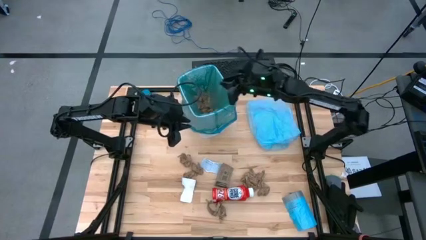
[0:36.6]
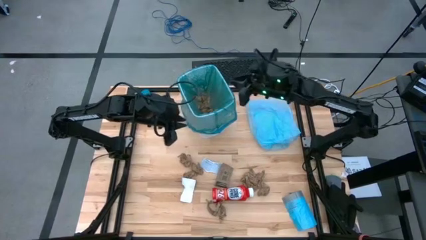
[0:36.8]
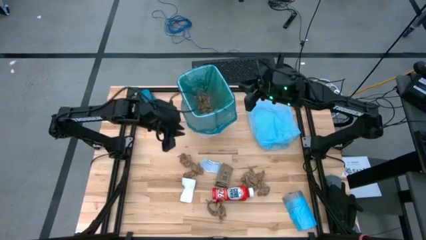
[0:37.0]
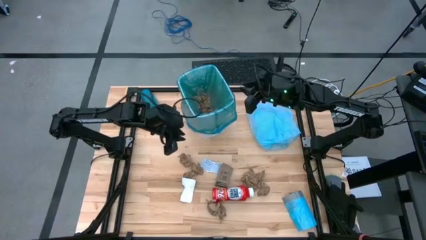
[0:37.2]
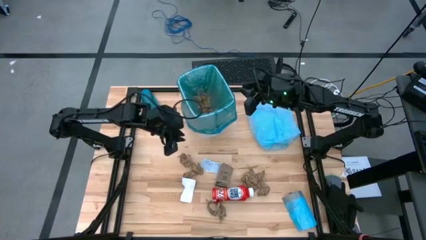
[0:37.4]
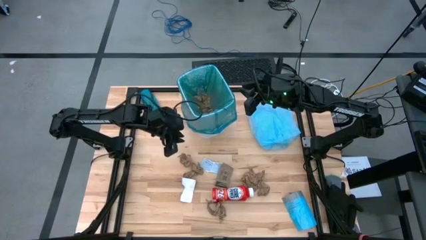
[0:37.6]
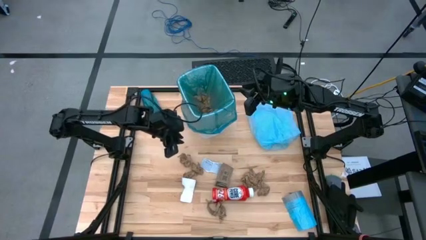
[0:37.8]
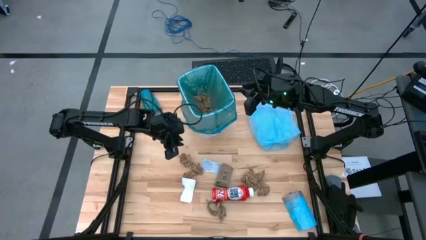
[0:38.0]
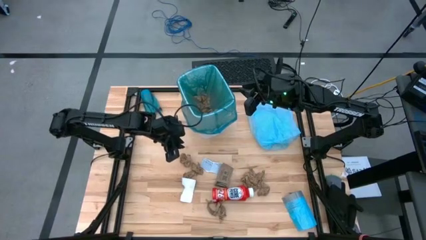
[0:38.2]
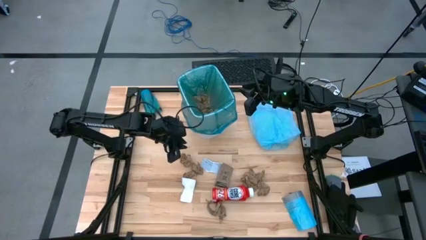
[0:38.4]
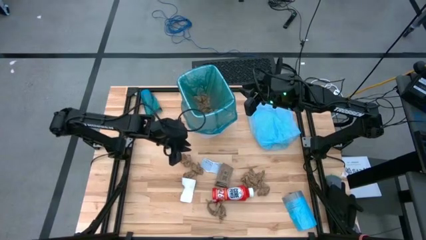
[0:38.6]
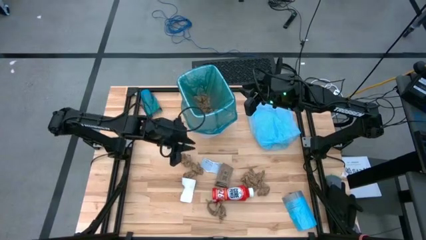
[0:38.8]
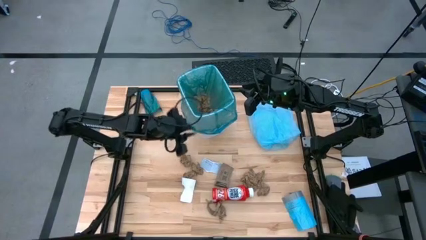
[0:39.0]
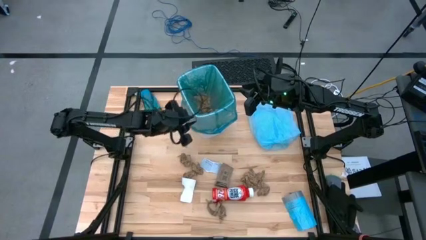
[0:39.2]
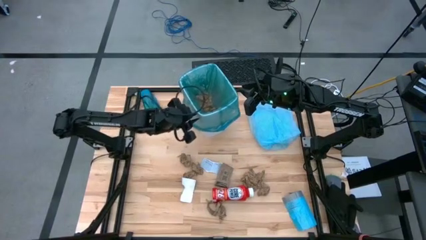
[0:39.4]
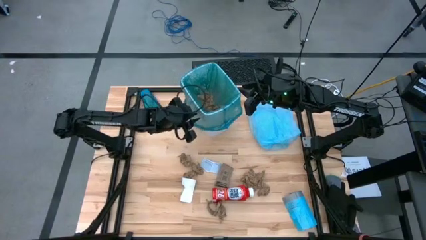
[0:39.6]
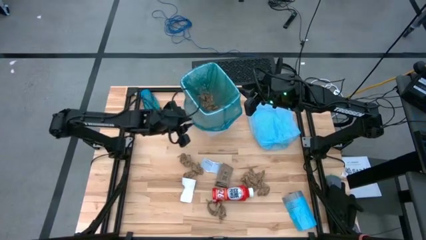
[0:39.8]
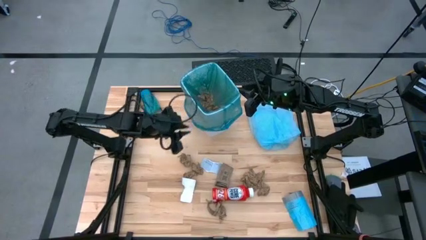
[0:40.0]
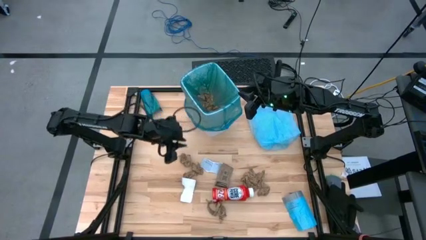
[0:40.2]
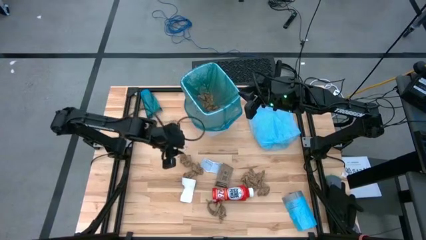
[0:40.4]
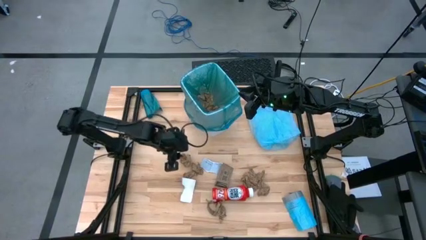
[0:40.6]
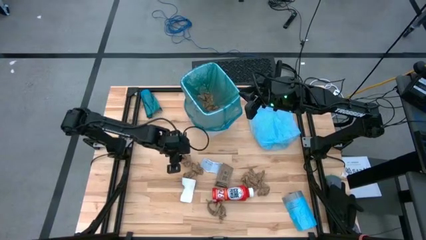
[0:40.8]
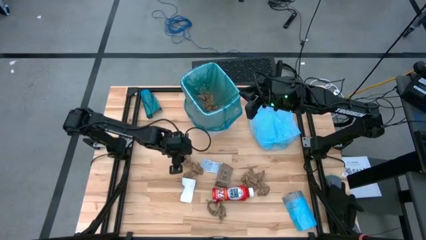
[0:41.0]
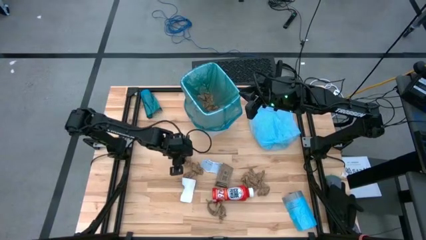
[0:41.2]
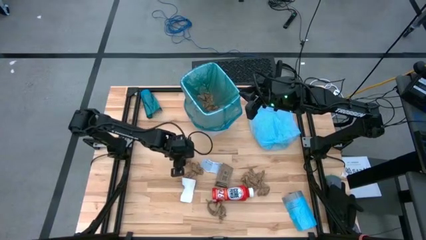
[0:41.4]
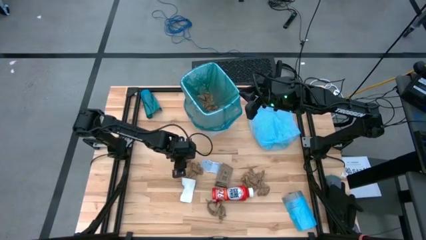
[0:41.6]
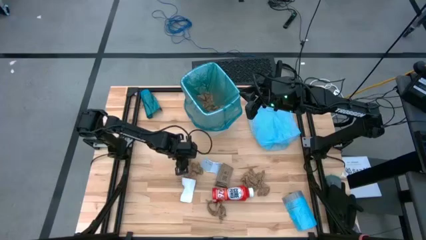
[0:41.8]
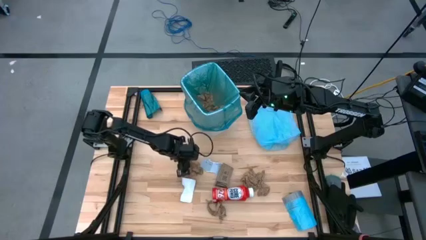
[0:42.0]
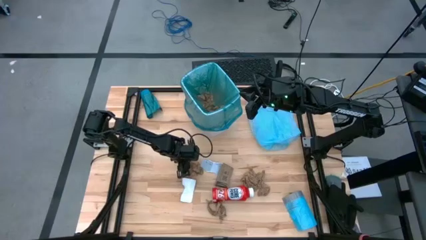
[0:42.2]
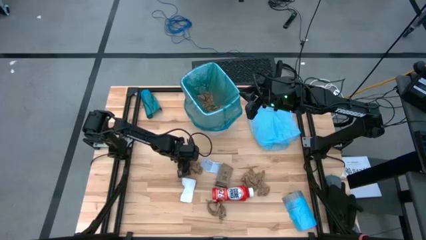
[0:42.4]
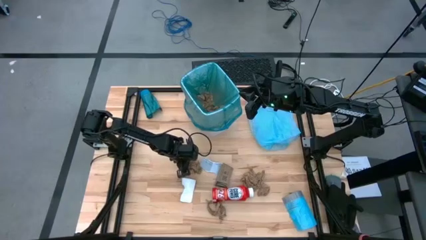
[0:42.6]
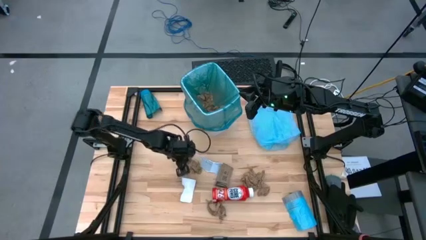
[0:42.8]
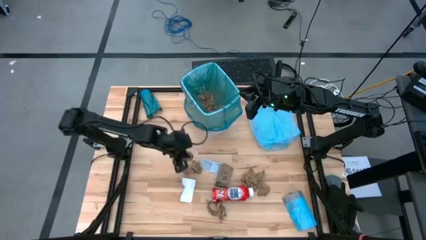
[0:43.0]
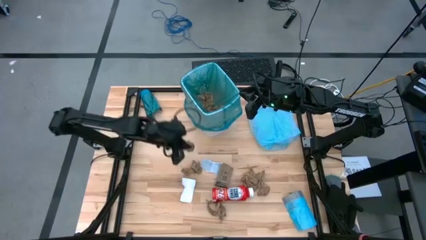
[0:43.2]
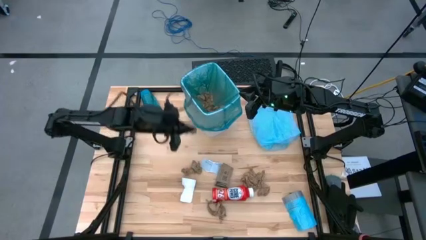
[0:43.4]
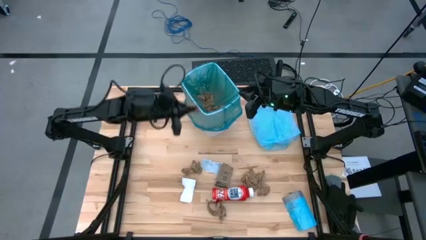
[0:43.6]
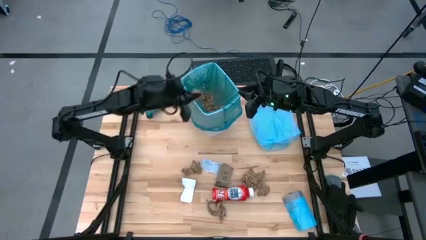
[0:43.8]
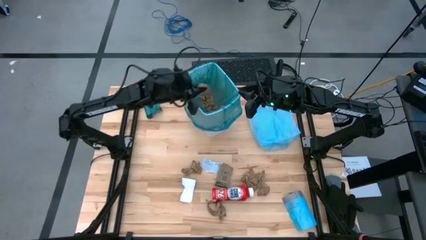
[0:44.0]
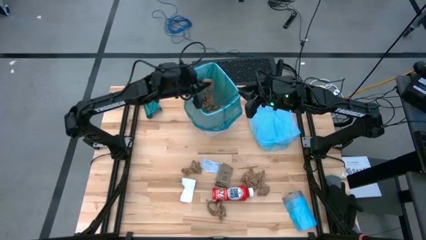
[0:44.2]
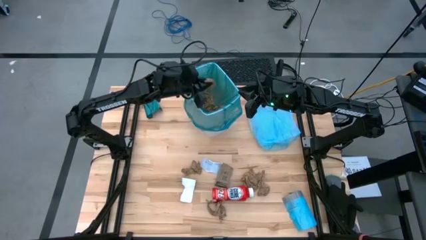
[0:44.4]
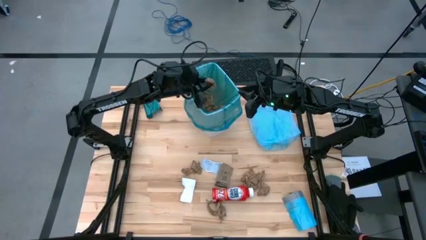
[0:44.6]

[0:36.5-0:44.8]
Task: place trash/remove bag and relplace
Put the brown paper into the blue trash bag inside the white trash bin

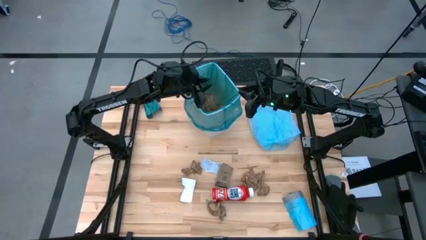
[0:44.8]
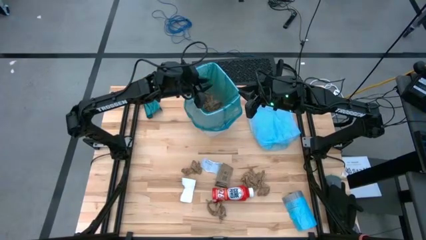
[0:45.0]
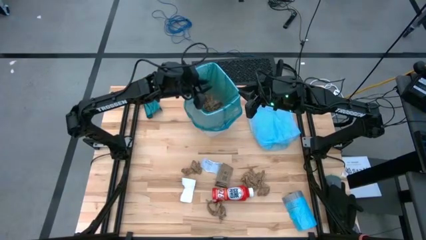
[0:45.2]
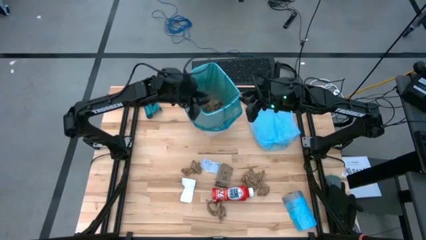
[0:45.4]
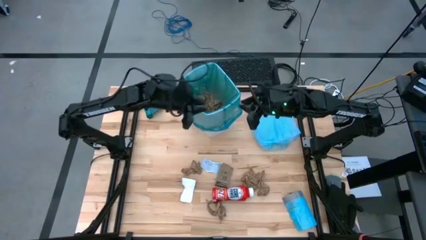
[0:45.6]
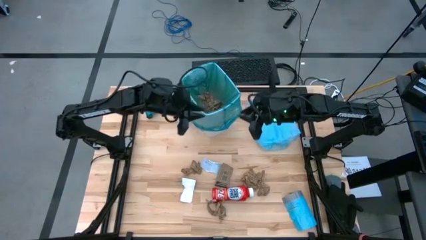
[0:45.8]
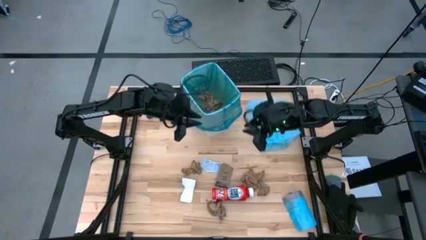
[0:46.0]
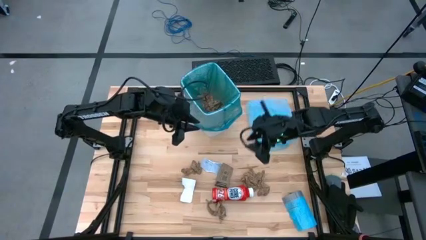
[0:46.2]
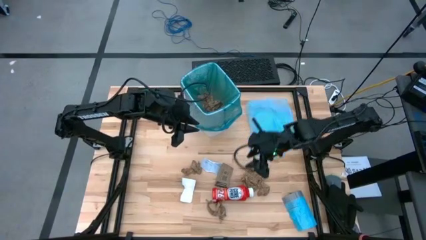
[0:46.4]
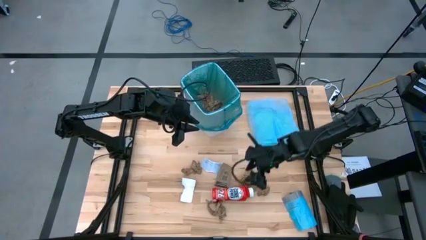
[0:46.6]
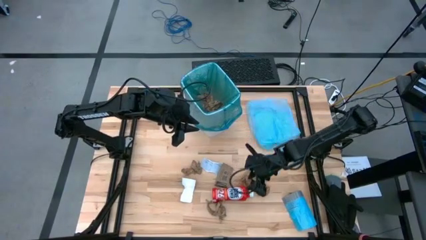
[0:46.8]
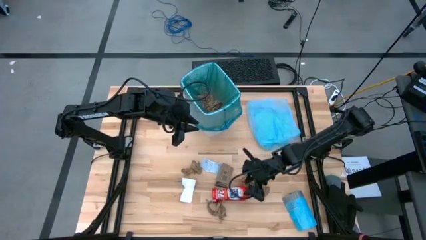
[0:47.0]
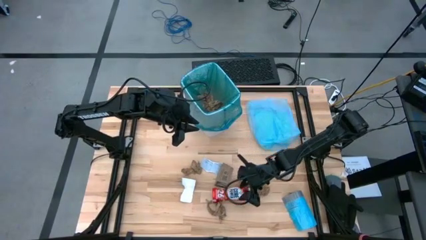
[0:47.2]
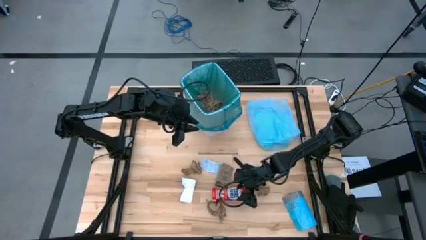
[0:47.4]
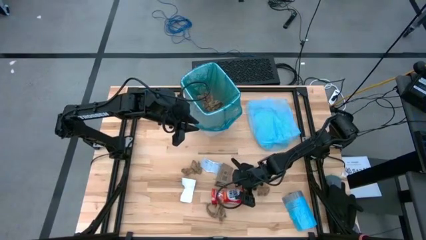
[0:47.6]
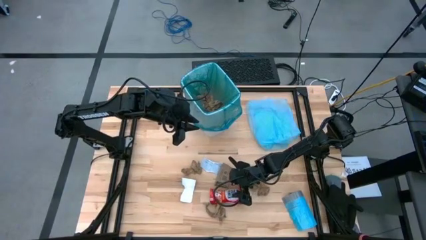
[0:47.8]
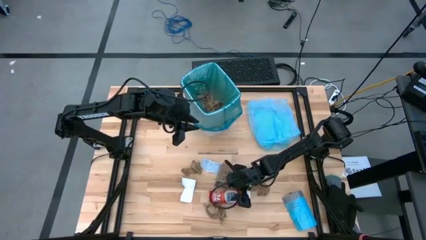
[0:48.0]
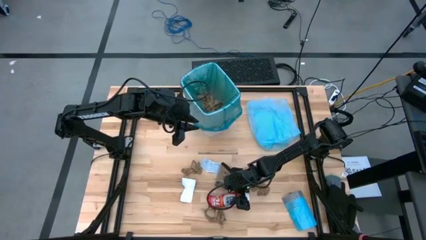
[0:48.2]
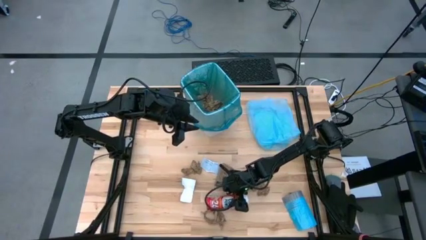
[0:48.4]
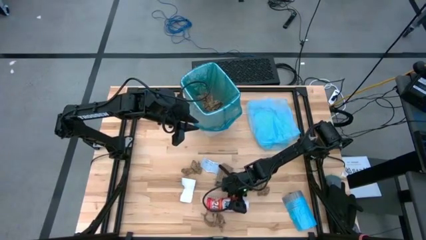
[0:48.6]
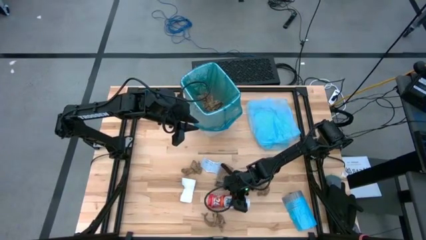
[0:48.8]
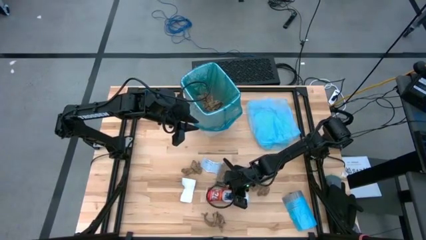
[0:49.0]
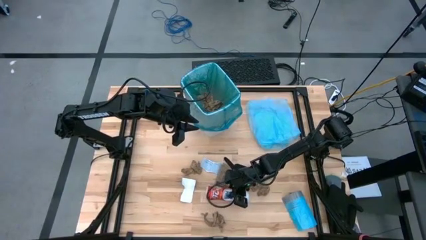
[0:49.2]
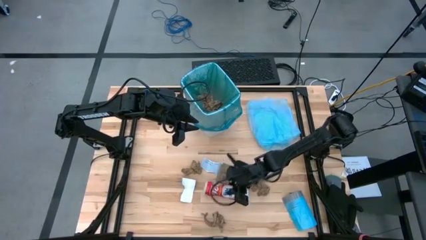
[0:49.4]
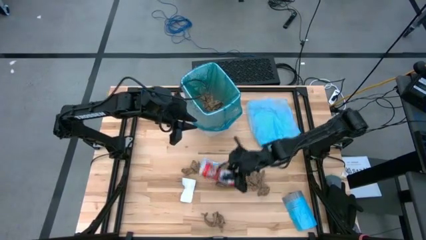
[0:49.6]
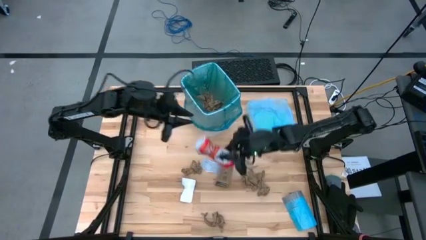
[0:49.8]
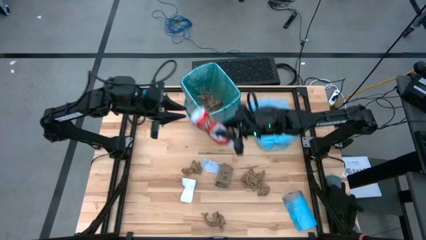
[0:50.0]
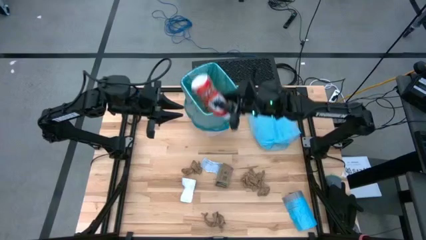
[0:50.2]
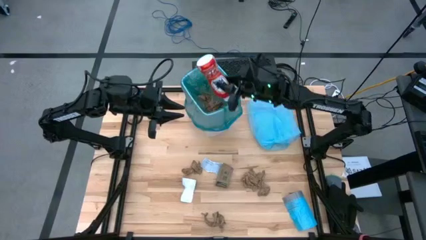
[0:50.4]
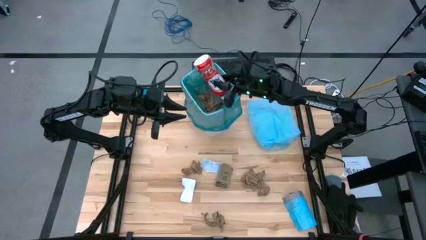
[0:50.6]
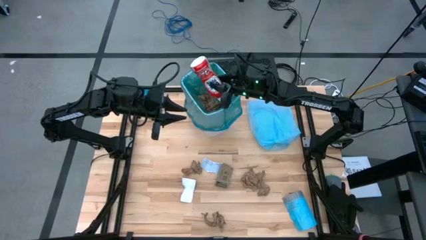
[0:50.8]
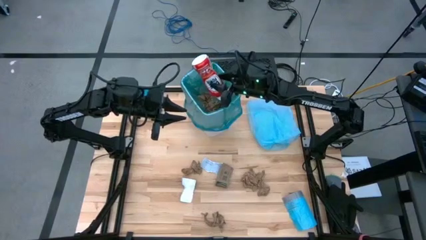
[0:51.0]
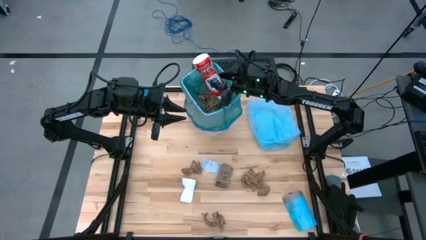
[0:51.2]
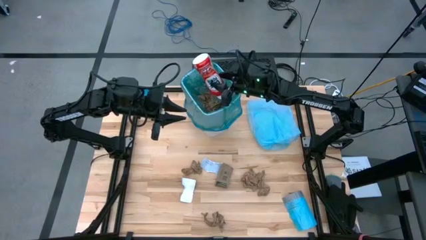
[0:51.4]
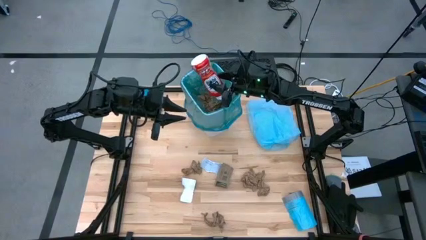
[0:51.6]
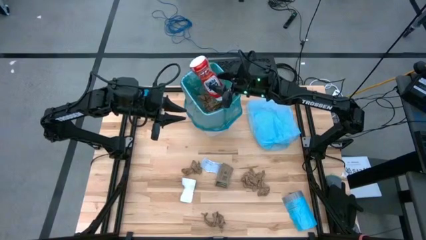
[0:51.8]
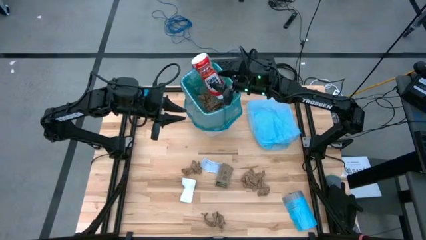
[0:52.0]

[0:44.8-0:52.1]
Put the red bottle into the blue trash bag inside the white trash bin

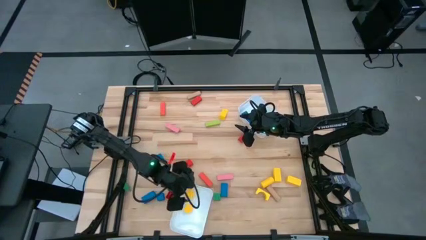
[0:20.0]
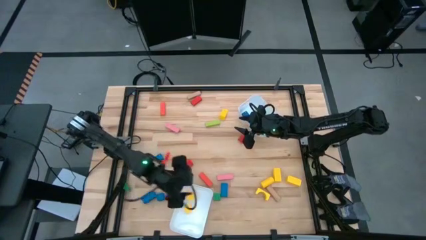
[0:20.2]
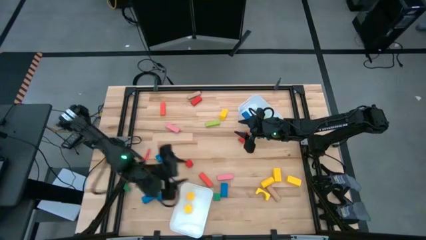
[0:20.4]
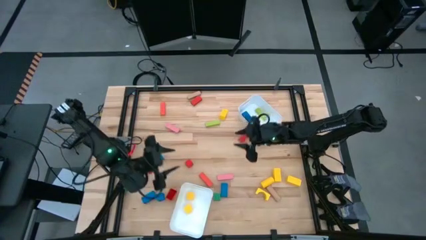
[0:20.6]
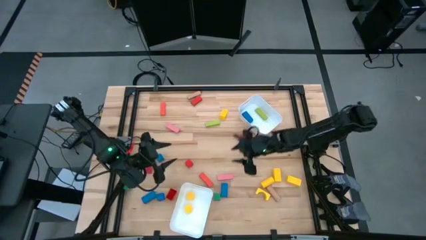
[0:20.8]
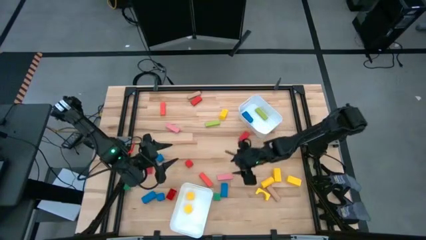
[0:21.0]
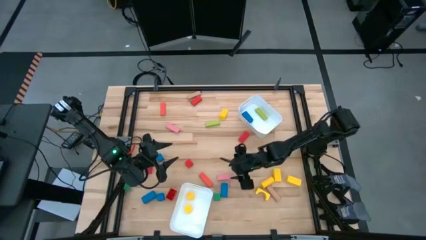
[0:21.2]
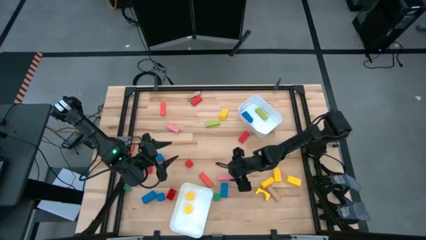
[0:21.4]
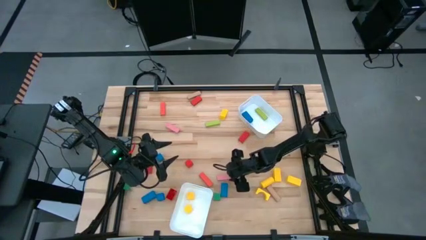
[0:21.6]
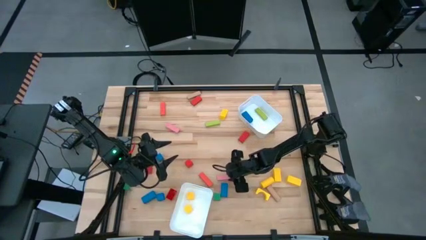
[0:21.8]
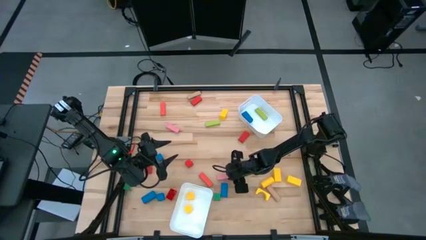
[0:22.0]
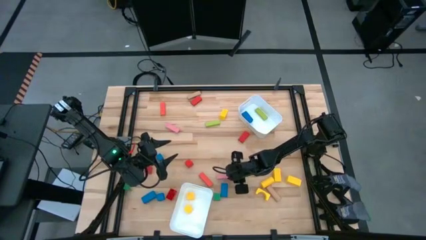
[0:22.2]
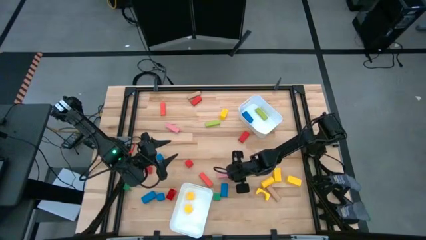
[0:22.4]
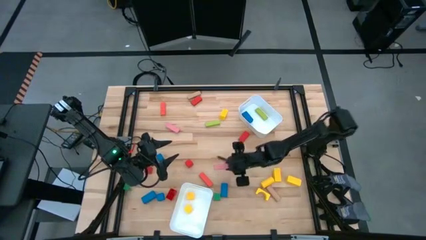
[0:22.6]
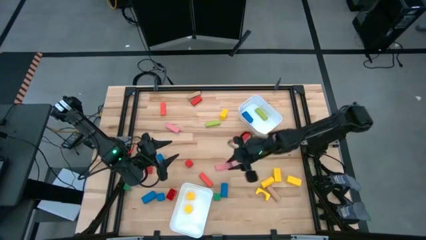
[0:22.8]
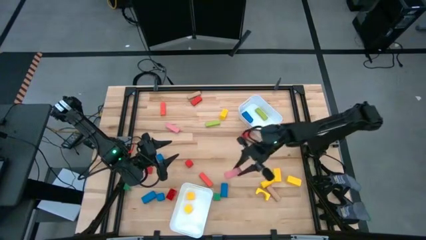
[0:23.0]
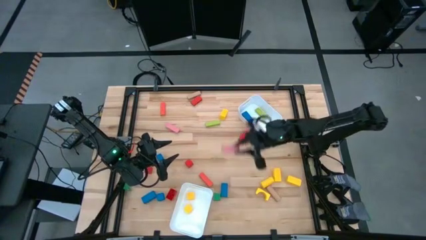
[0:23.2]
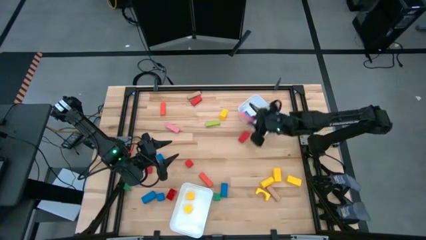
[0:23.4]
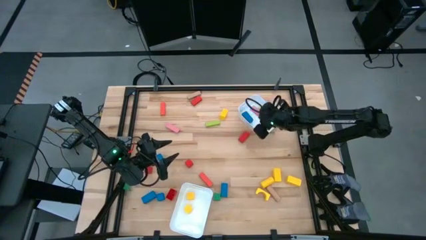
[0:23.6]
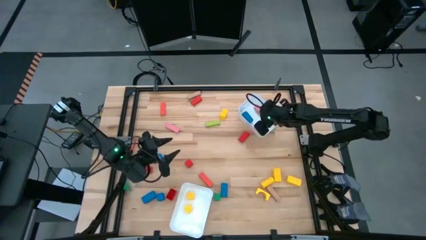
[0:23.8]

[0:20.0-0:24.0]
Task: Sort blocks by size
Put the pink rectangle block into the top white bin
